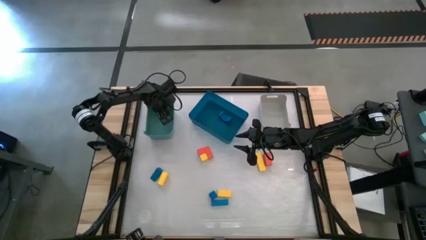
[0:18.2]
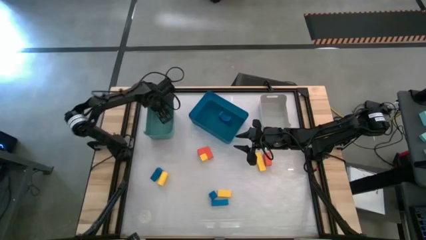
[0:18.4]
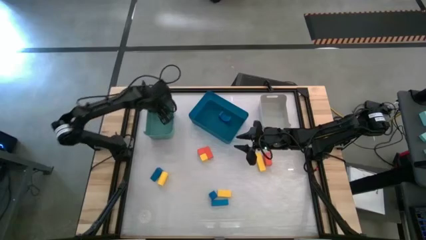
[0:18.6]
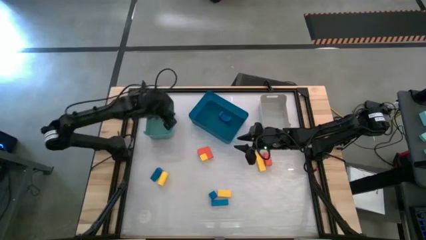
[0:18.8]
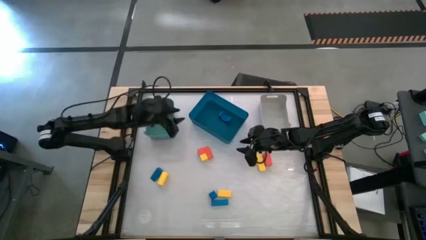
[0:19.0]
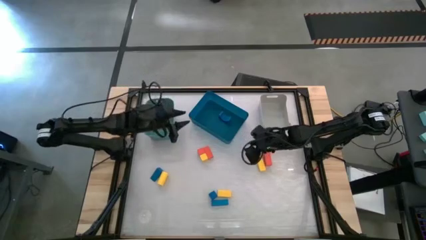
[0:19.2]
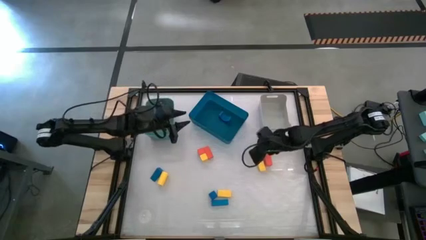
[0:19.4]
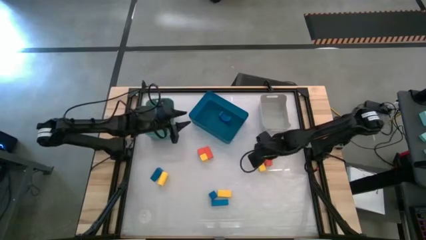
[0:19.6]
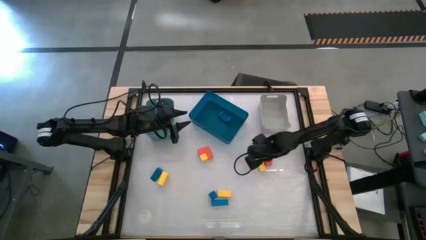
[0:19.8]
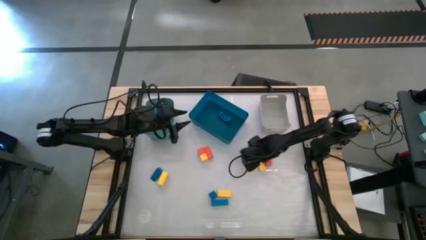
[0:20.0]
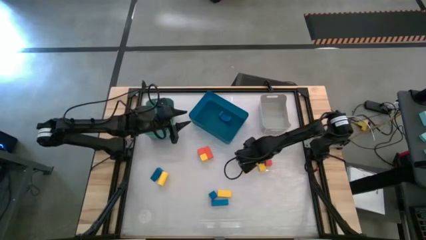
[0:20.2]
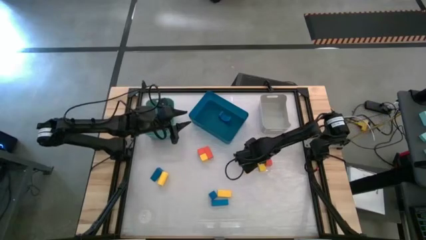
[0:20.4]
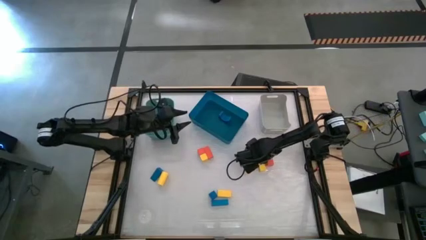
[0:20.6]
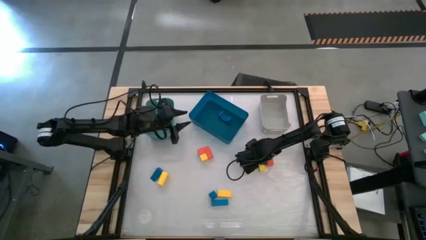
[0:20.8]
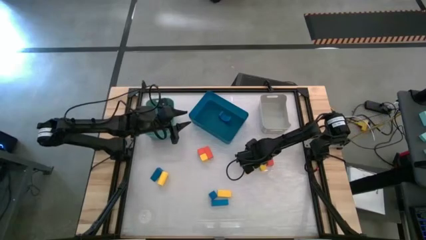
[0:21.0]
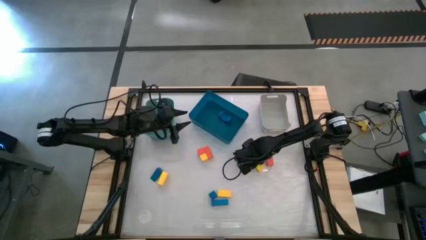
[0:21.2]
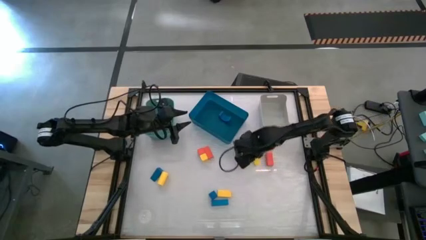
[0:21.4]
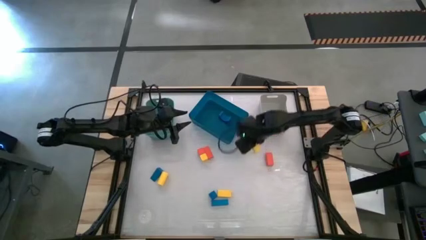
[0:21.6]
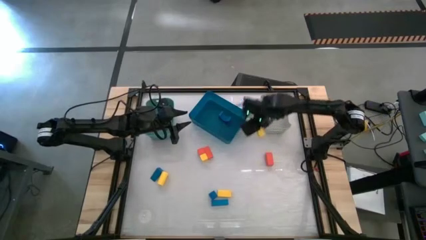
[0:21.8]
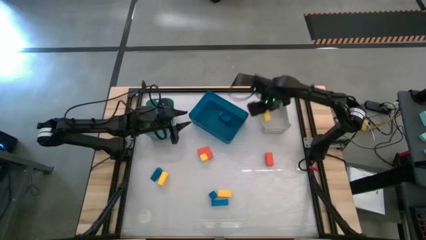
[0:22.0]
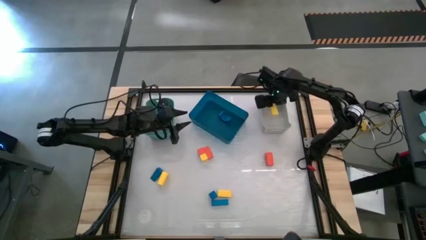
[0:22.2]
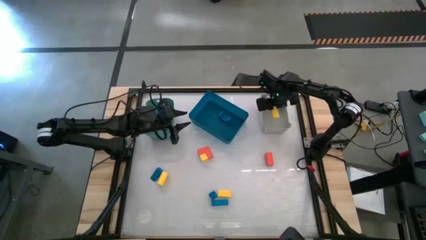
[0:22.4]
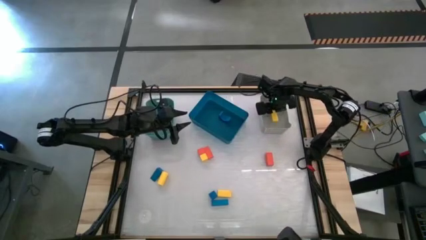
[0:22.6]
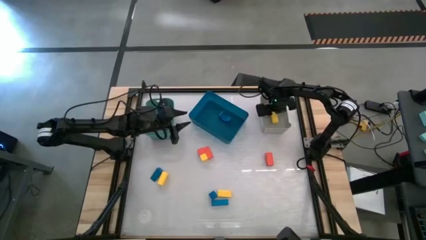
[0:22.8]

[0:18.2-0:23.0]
Task: Sort & place blocks by color
Put the yellow block into the gray bin

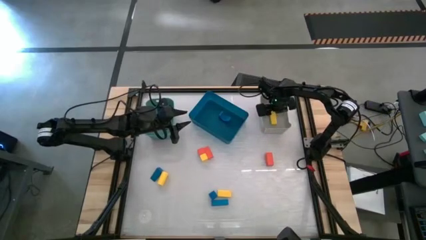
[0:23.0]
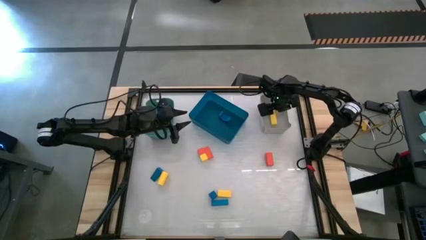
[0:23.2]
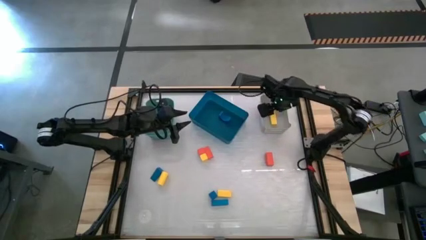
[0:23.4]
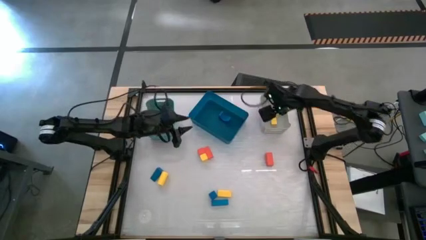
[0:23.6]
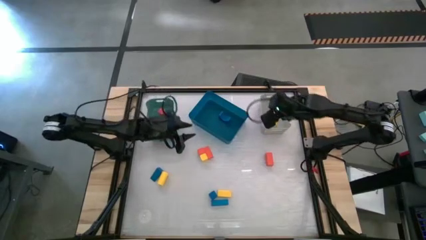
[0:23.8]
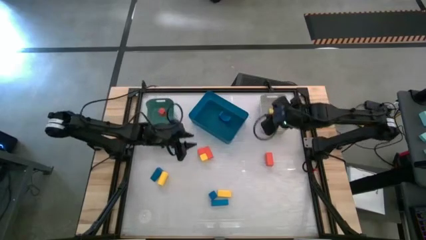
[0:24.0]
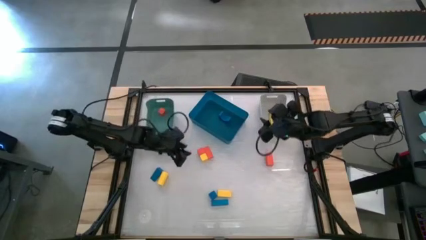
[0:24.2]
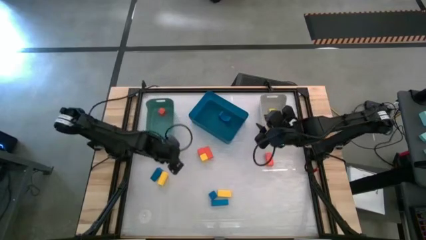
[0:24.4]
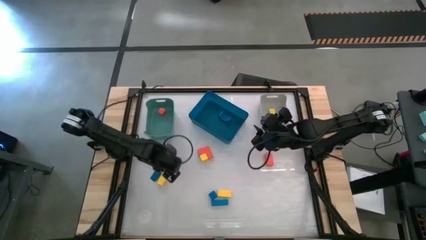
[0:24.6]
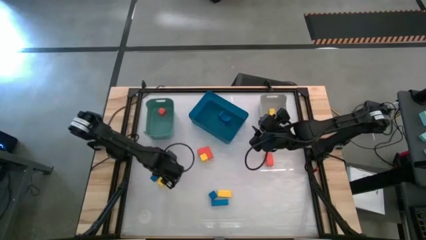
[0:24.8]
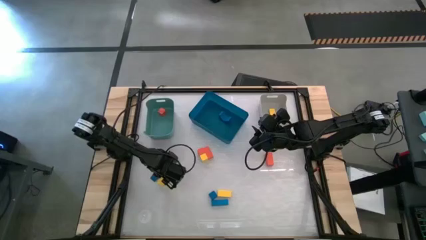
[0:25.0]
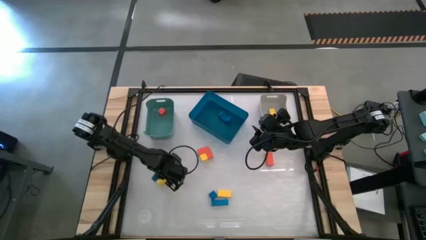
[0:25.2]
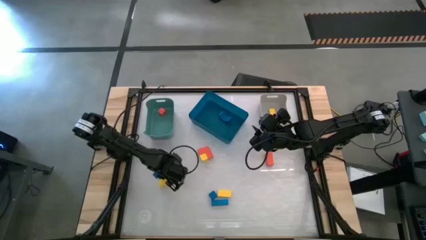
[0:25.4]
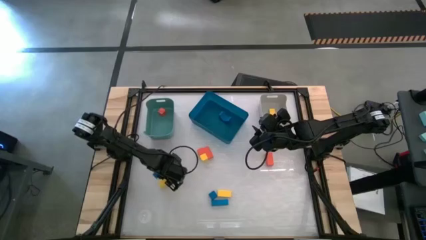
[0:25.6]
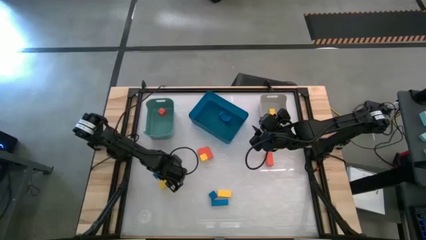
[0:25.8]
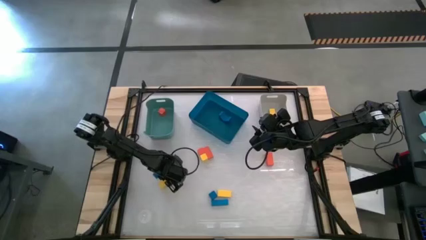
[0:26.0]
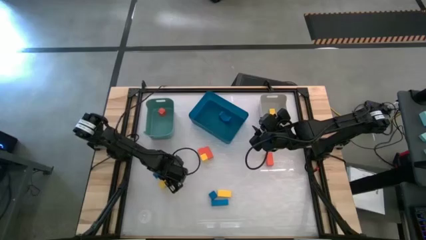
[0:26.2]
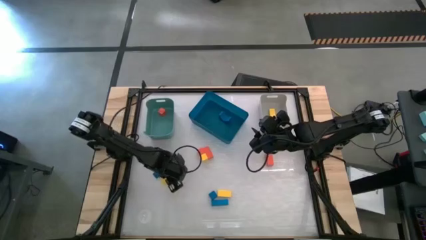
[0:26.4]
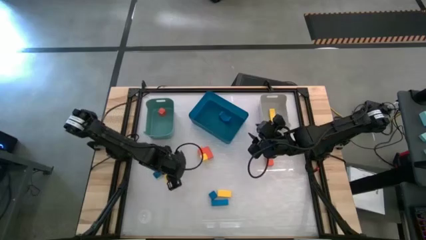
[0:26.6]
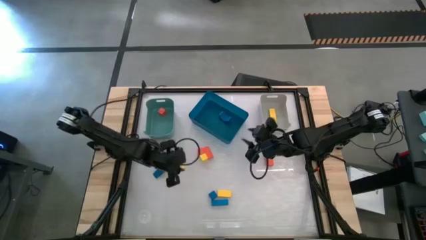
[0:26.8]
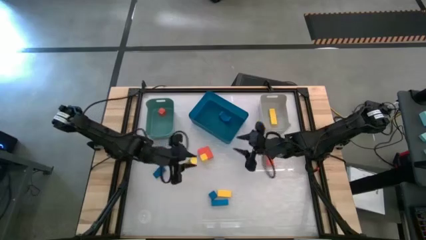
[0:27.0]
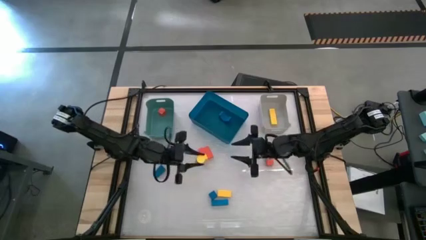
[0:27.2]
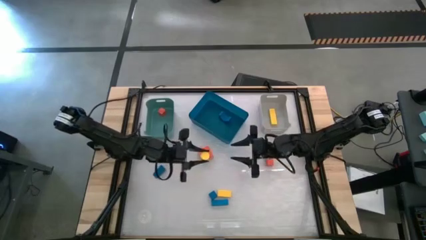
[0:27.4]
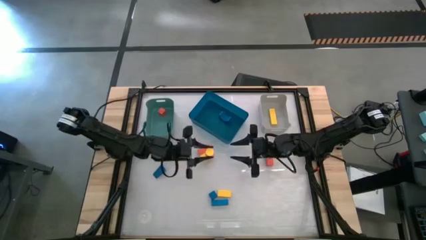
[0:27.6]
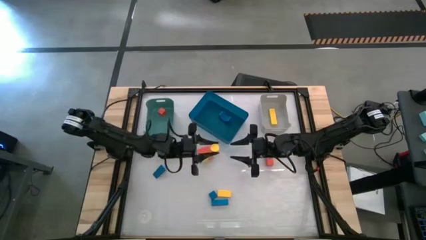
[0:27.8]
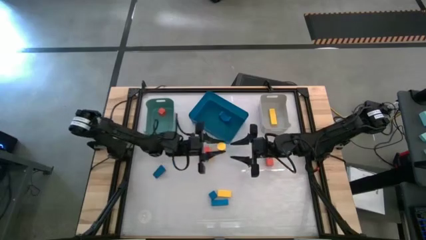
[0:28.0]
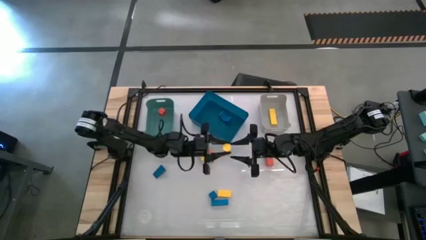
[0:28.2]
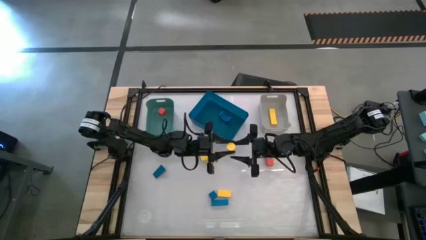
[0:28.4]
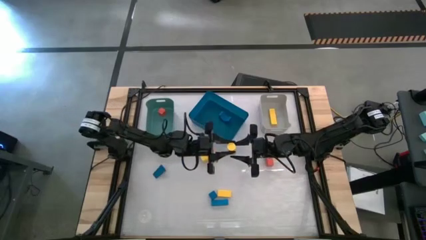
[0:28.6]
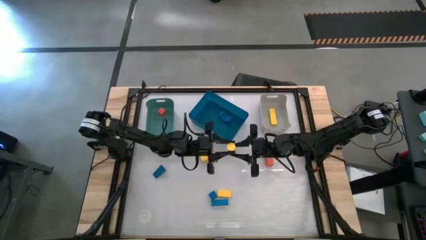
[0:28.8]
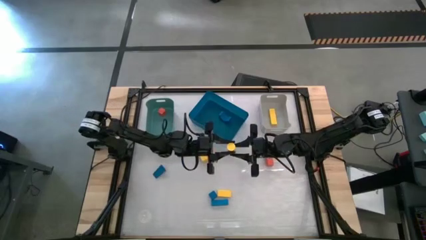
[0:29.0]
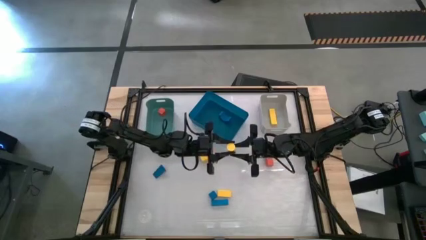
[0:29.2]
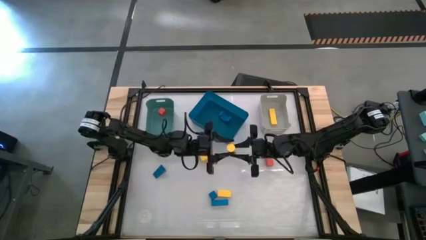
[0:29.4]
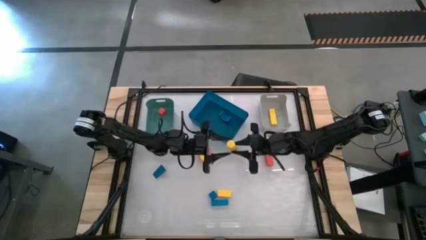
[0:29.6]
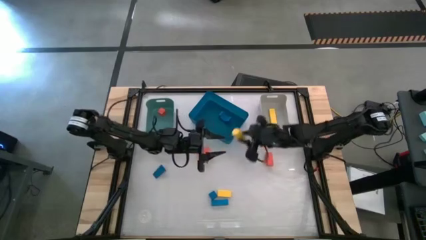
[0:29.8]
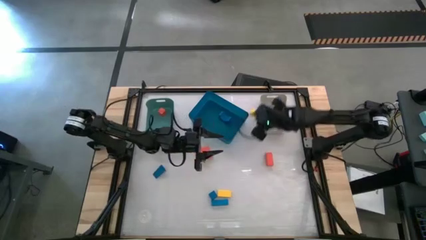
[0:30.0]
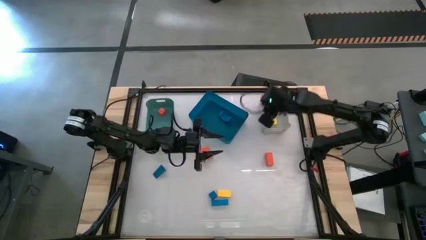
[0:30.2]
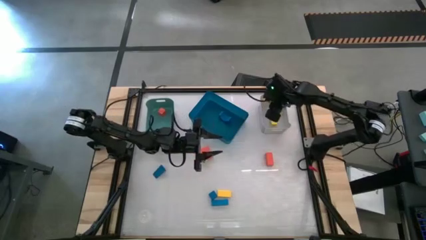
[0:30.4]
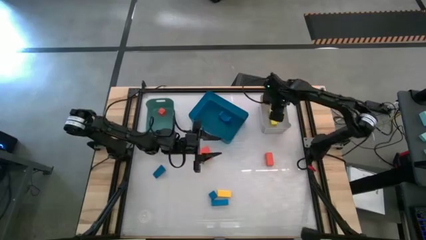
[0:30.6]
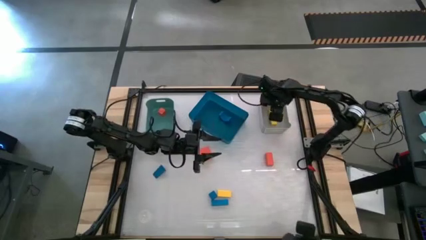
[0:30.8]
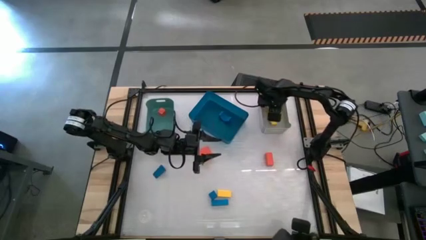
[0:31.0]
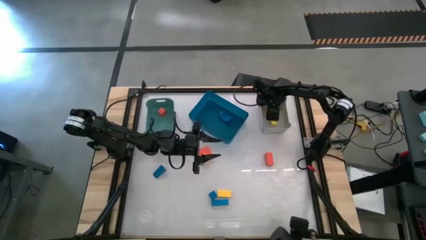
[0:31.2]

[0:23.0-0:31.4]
Put the yellow block into the gray bin

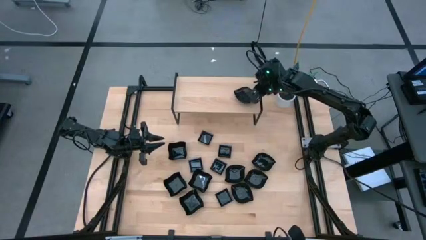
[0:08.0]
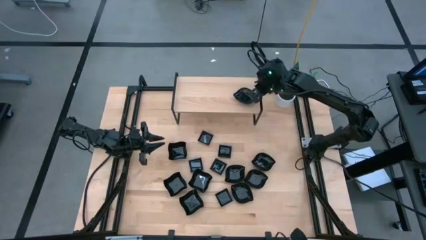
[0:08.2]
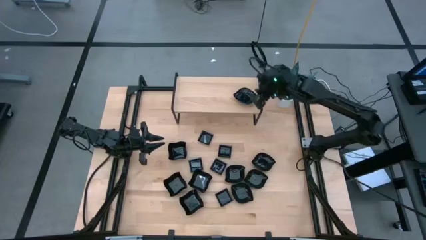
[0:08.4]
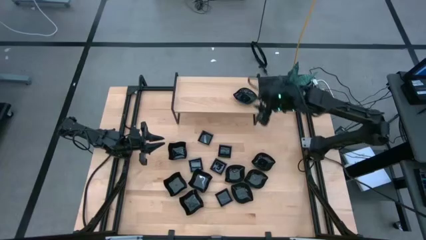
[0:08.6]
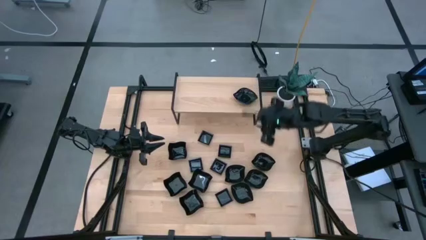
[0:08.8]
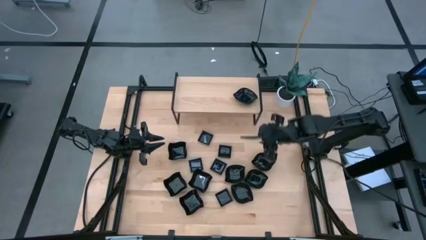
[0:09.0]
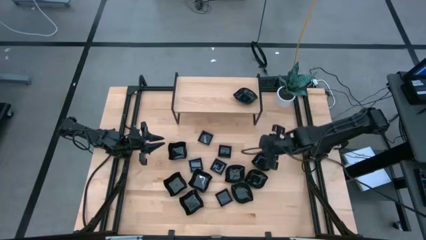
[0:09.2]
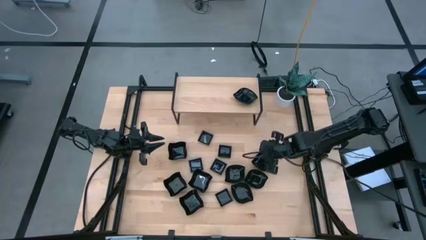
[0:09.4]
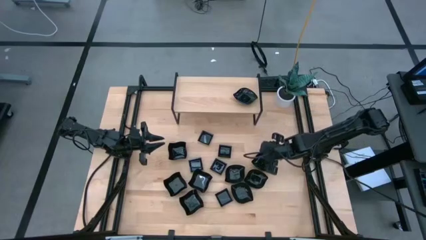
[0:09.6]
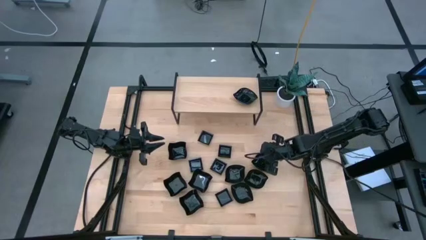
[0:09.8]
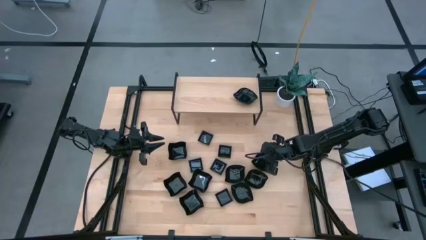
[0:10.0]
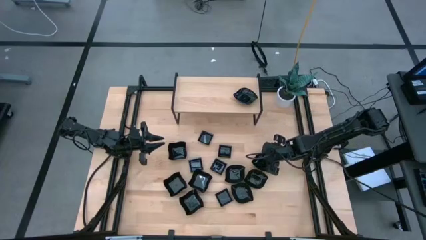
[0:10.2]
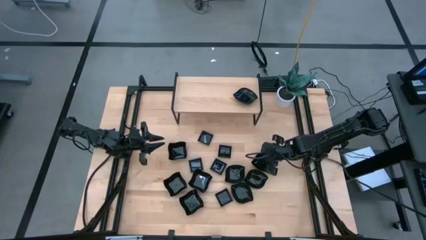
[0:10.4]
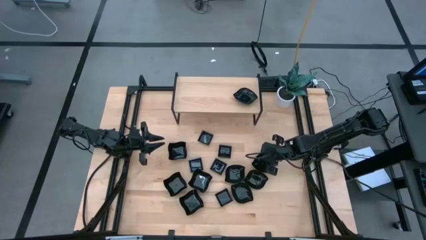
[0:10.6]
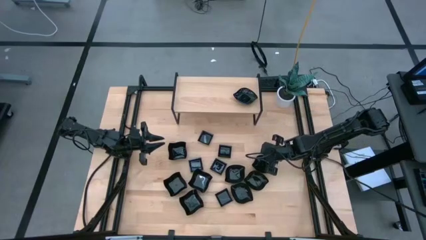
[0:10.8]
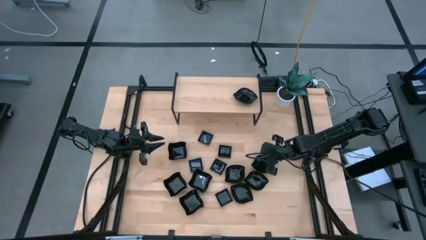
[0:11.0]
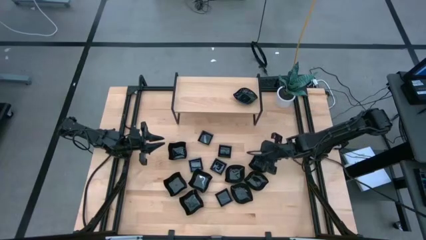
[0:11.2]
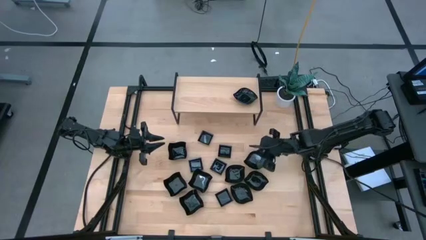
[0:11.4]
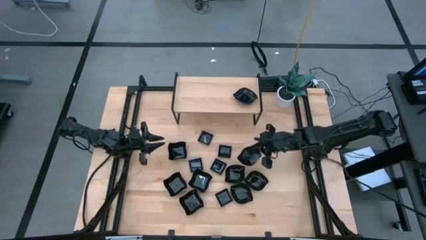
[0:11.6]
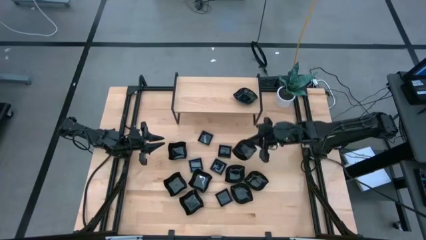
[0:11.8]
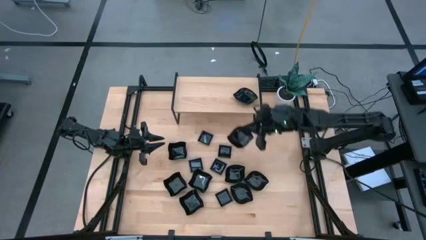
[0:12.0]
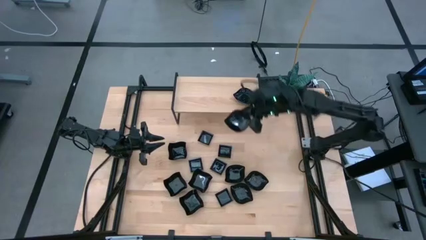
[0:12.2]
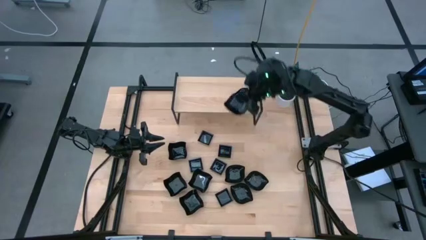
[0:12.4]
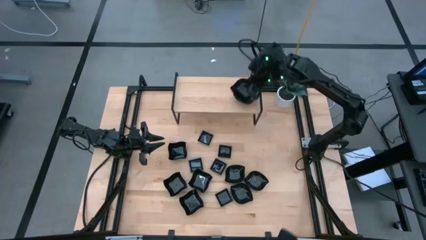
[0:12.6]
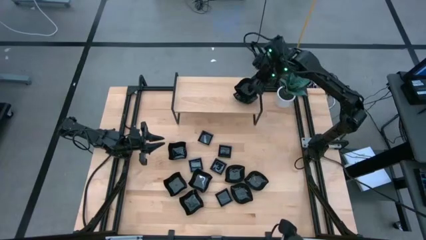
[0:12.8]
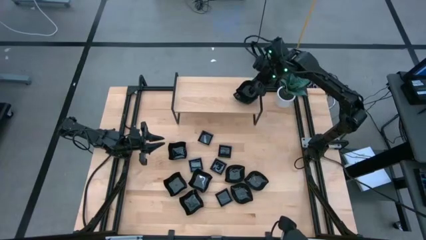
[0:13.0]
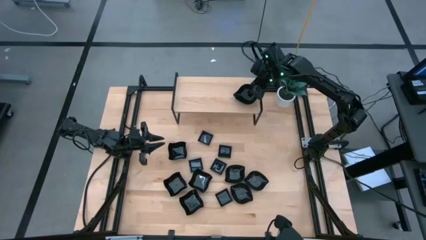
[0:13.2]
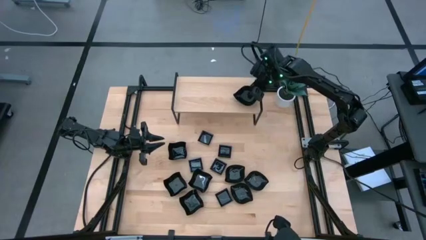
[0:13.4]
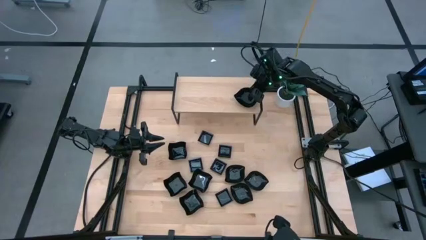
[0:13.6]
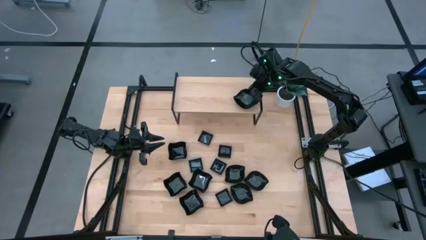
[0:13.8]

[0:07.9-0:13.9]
Task: Pick & Place Mini shaped plates
Stack the leaf-shaped plate on top of the other leaf-shaped plate on the shelf
